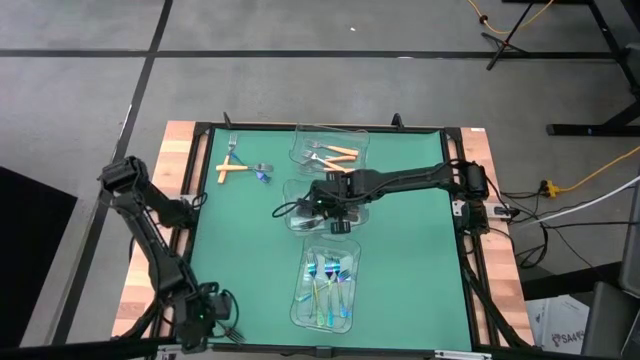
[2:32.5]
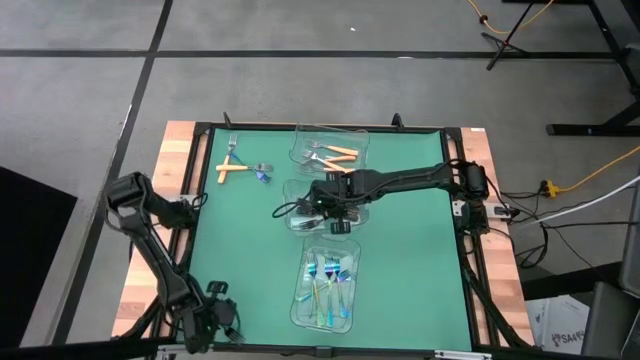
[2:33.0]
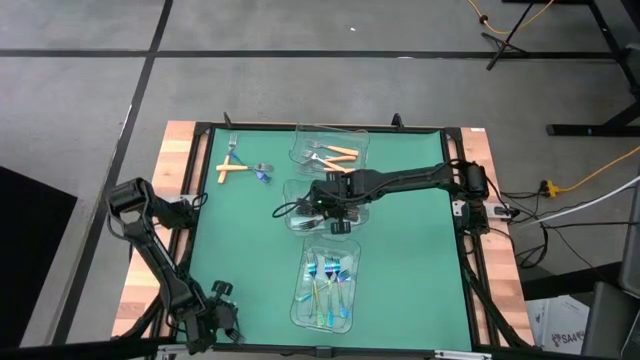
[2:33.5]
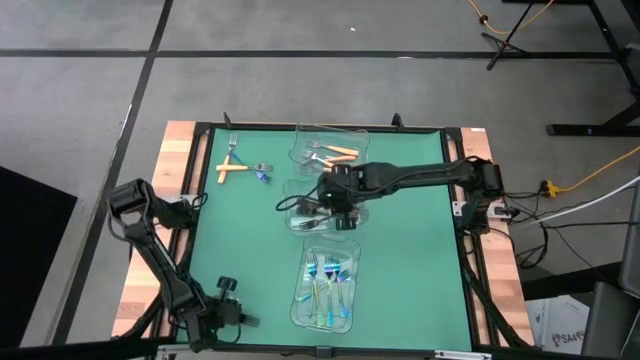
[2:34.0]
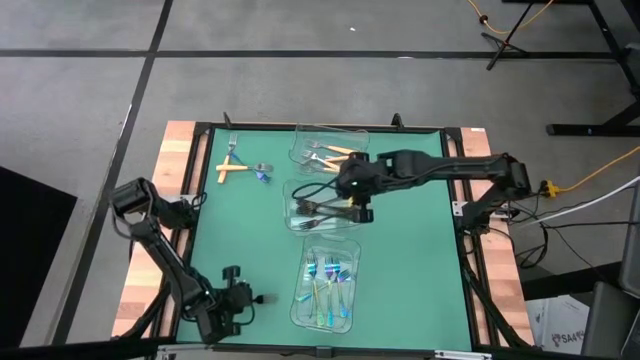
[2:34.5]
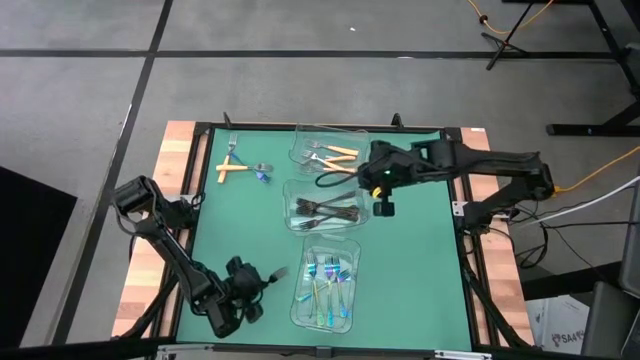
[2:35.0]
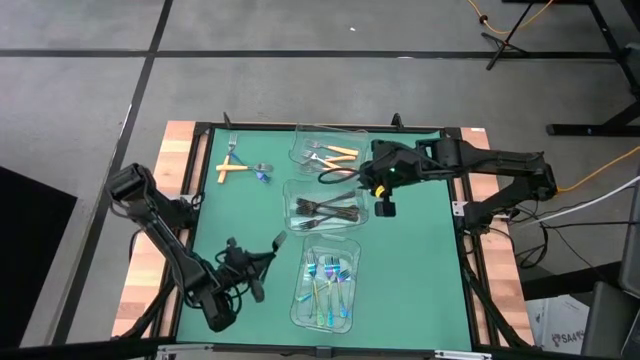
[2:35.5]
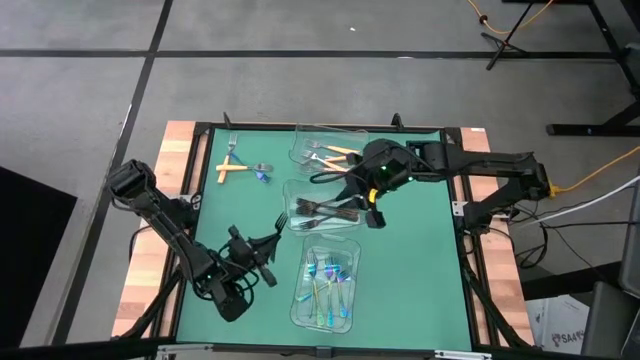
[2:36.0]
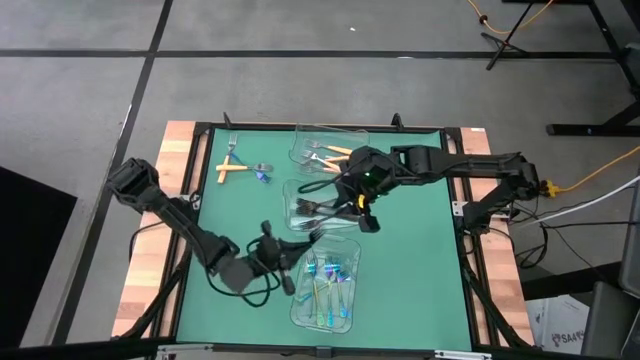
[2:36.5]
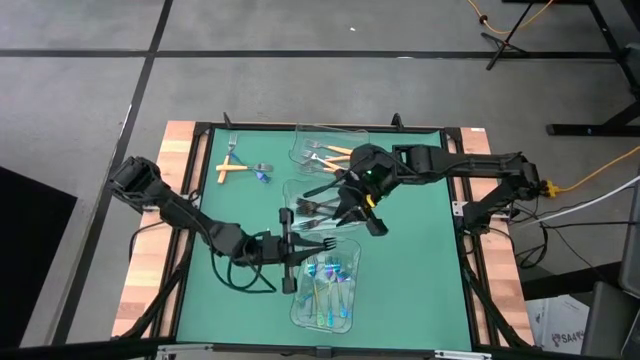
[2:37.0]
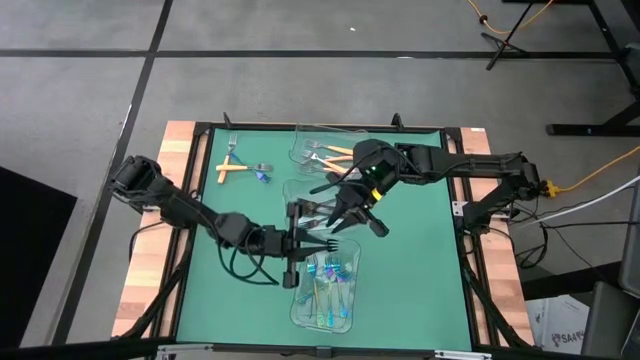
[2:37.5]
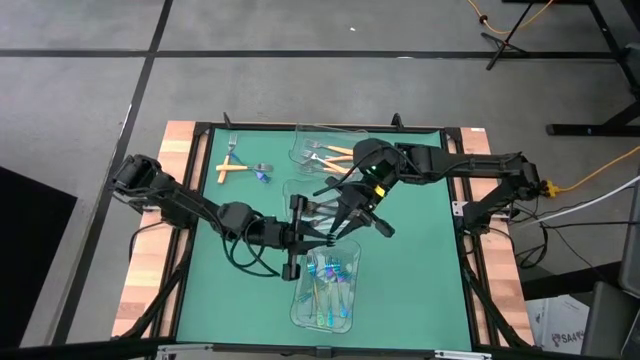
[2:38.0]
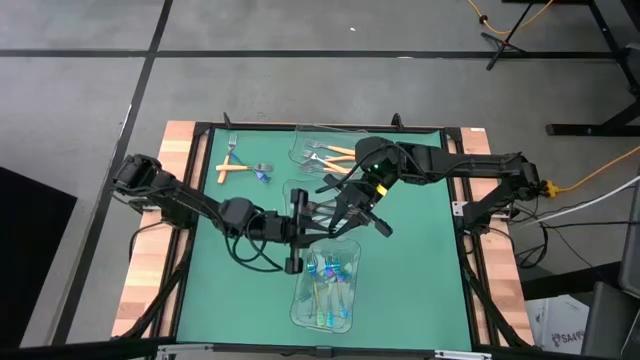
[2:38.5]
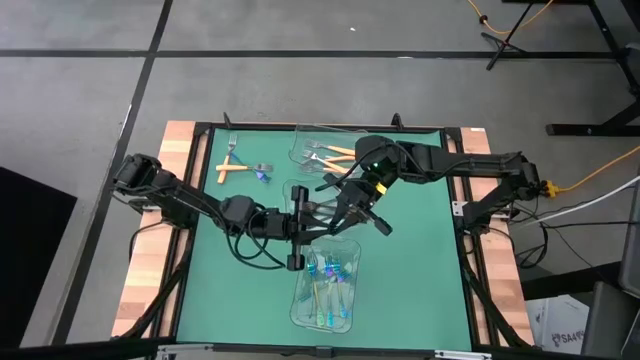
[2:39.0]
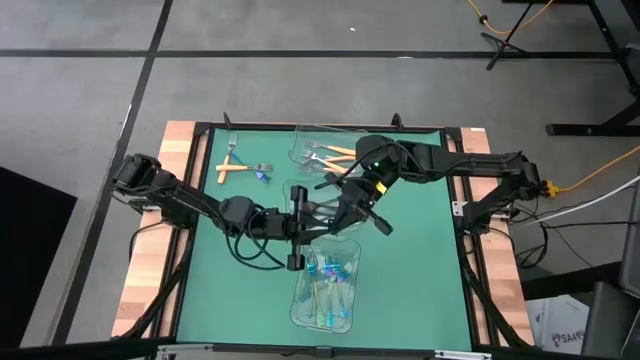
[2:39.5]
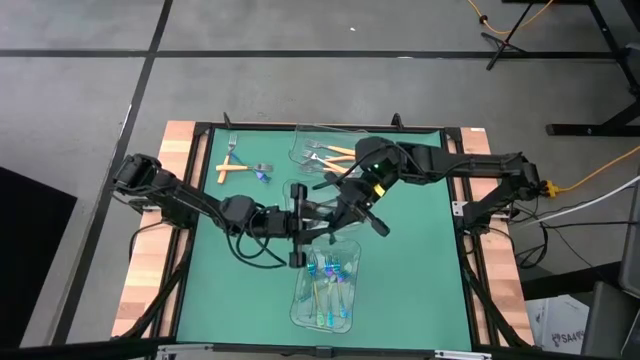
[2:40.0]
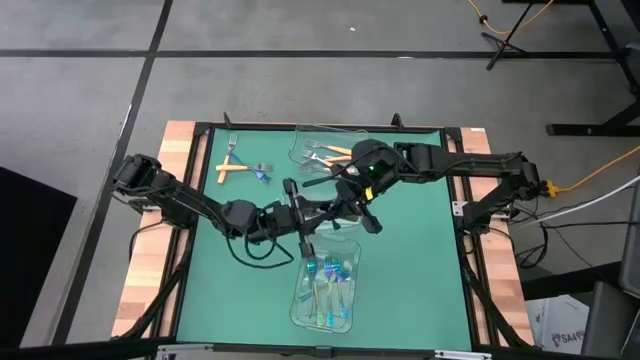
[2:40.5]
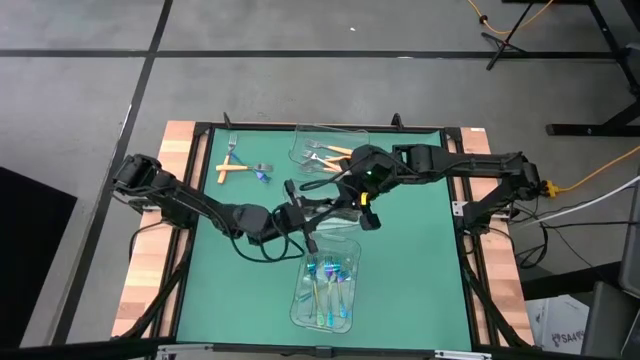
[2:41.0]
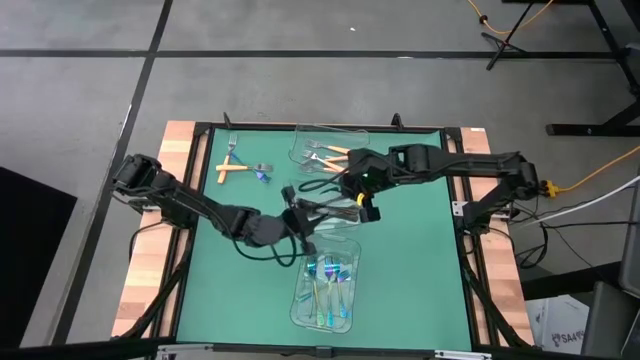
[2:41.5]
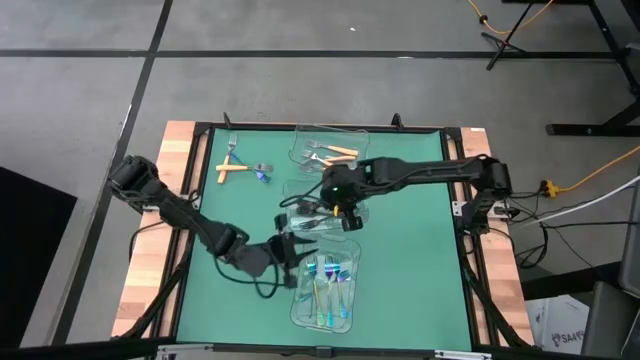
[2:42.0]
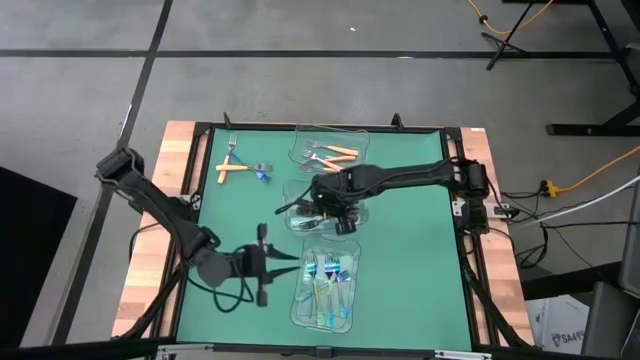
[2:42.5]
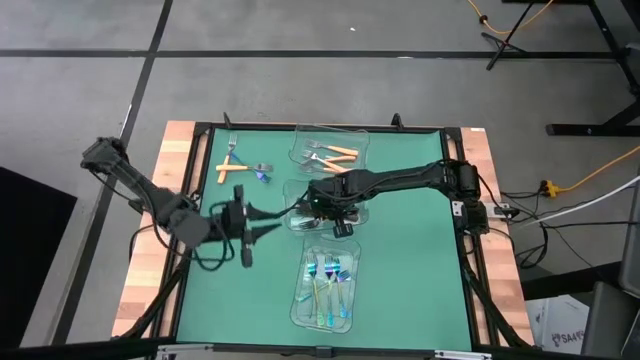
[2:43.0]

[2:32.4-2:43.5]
Task: Sort silverware by color (type)
Put the black fork into the middle transparent bin

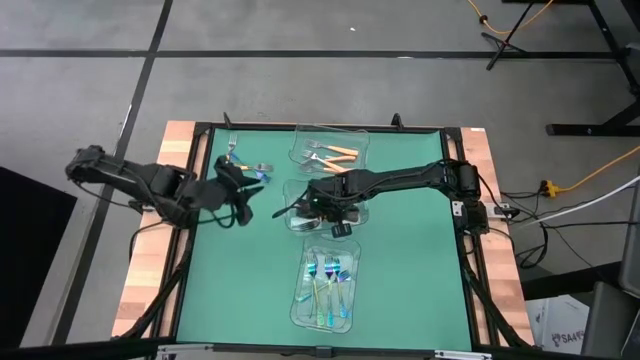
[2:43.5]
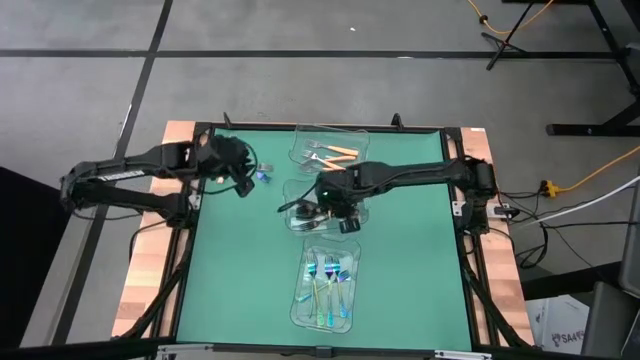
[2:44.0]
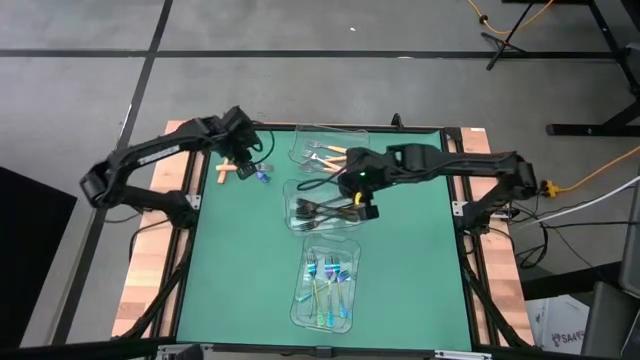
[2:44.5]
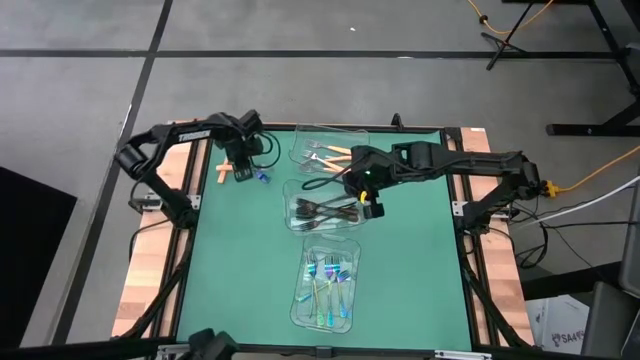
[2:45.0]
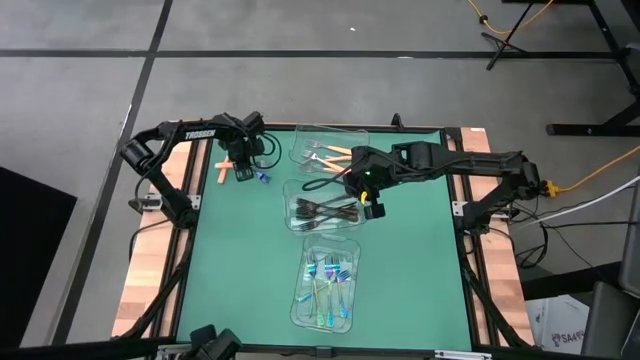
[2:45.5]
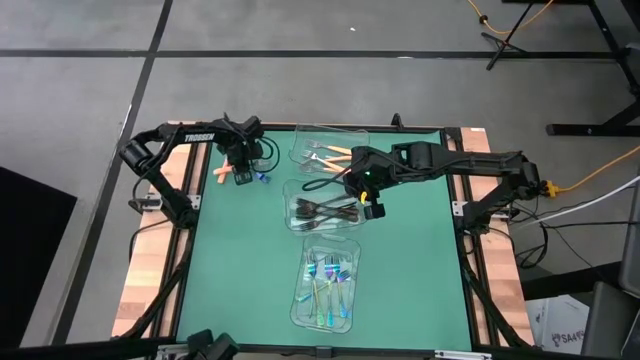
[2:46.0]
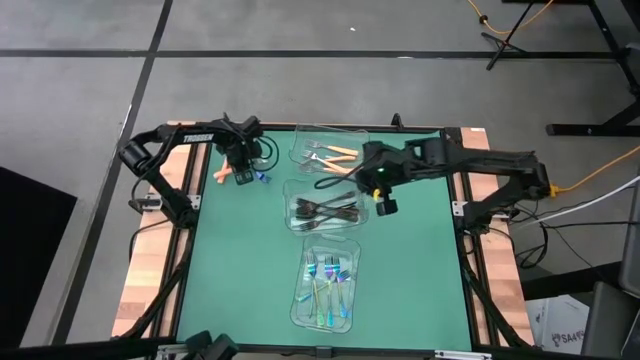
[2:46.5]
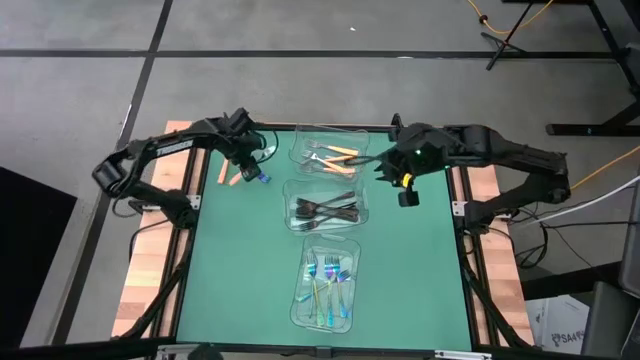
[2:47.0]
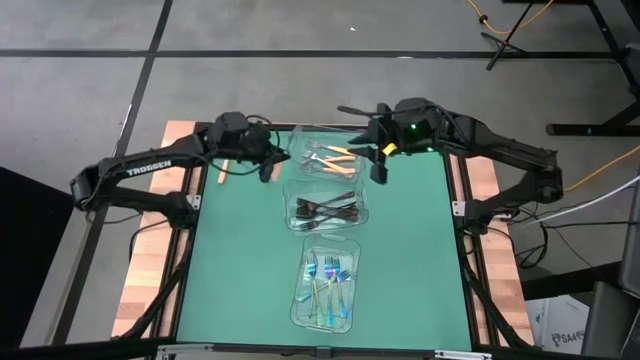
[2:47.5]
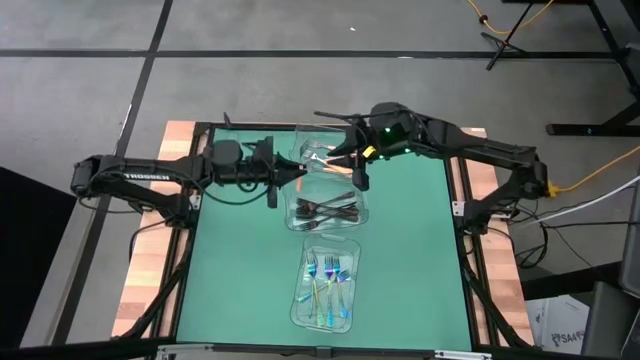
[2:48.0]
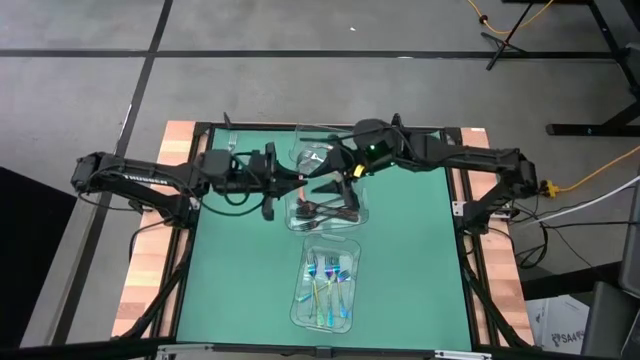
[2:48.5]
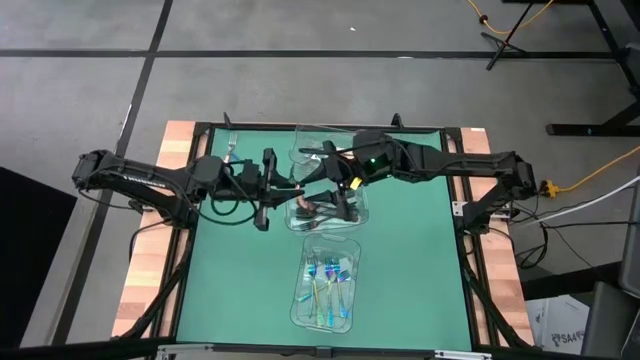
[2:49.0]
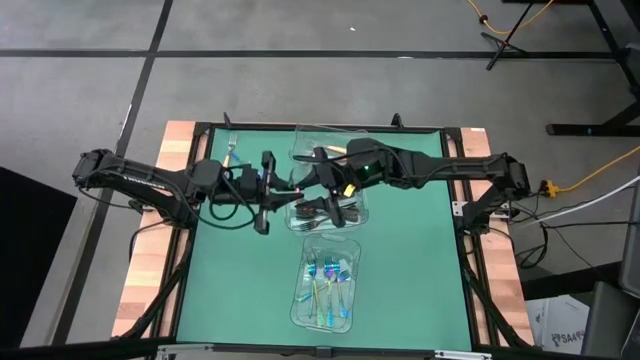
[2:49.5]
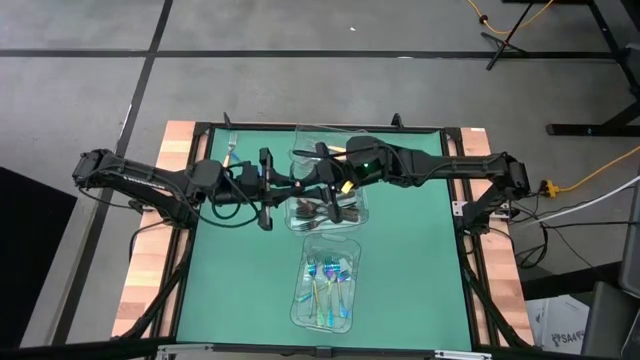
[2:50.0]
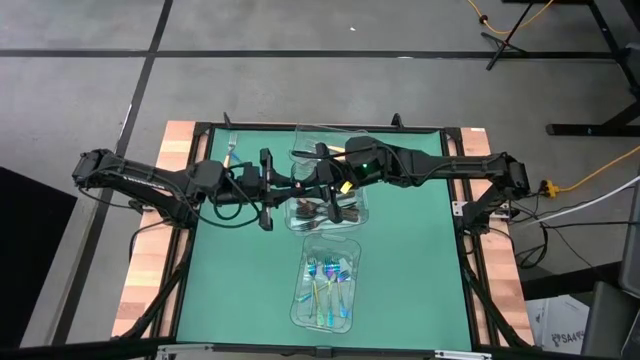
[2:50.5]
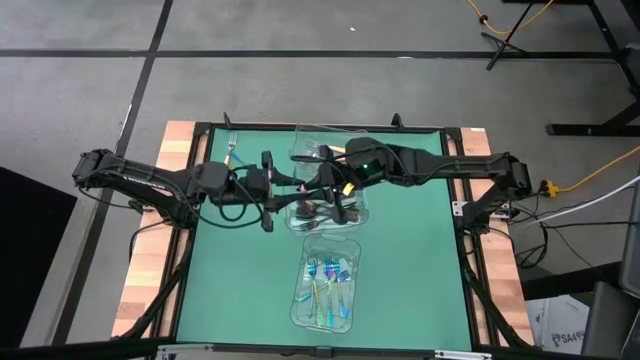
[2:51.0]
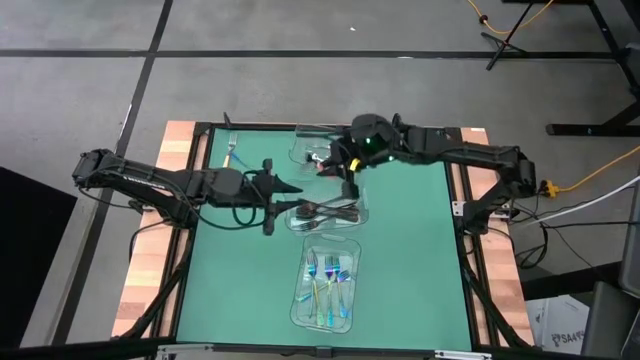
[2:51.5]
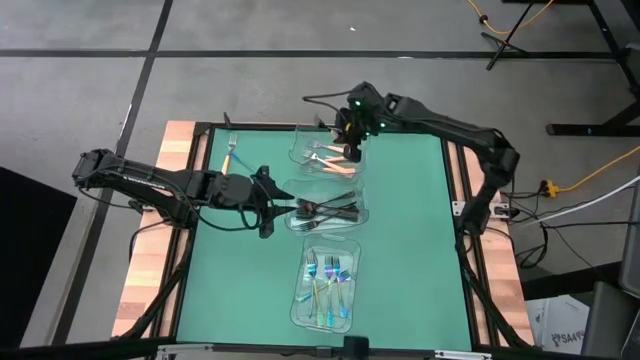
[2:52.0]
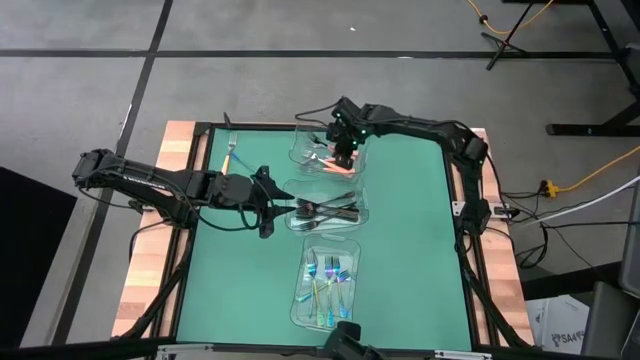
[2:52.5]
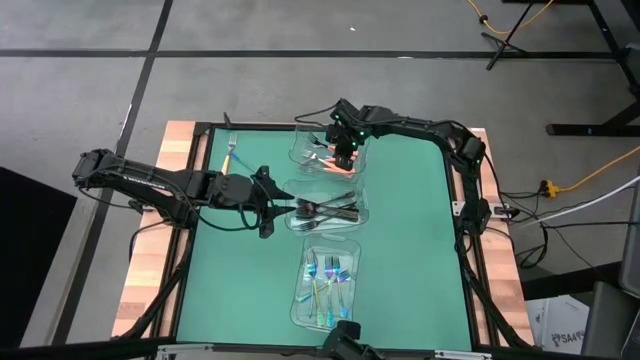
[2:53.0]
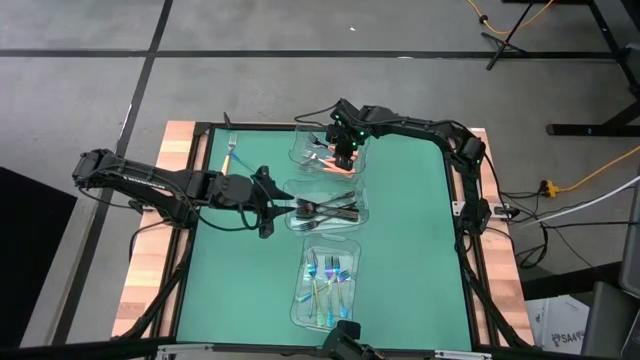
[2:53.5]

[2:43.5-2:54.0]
Put the yellow fork into the top transparent bin

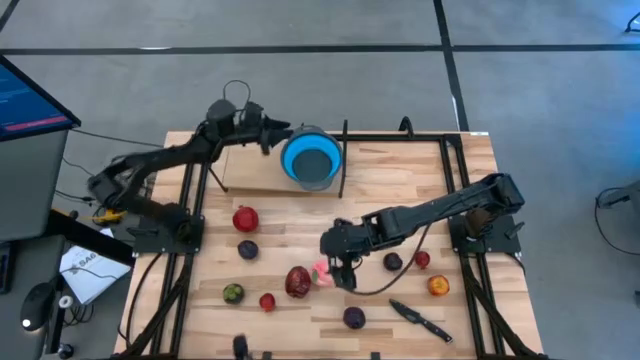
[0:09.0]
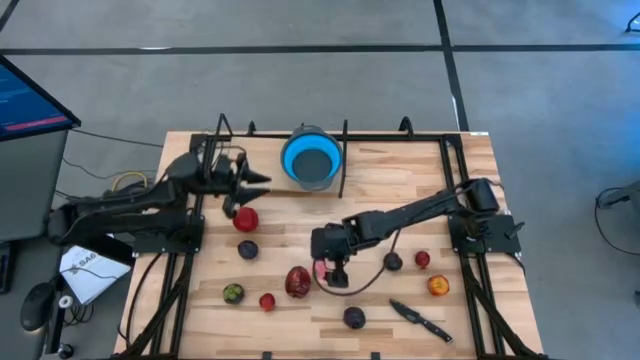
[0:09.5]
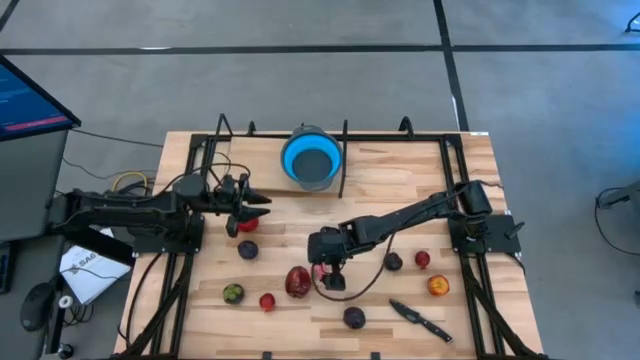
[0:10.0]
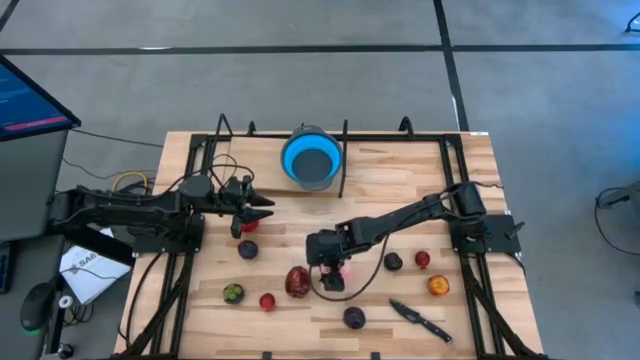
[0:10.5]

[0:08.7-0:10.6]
Task: Pick & Place Fruit
Put the pink peach into the blue strainer bowl on the shelf
